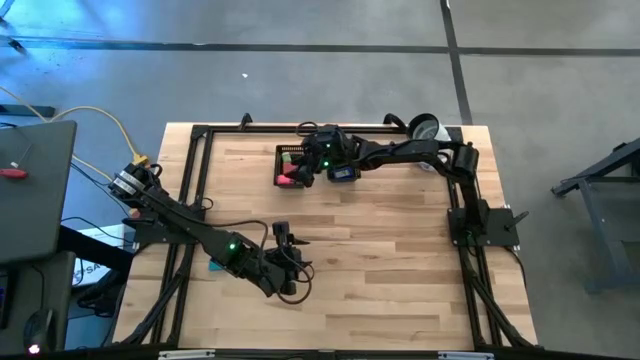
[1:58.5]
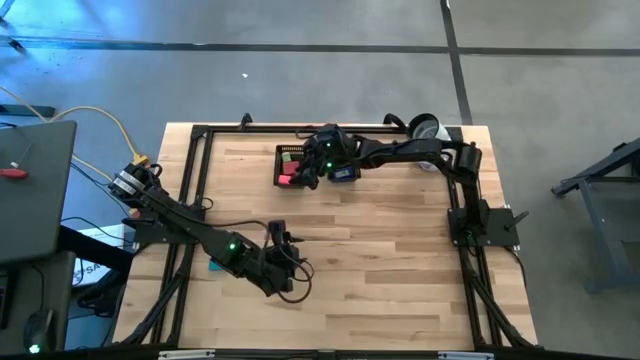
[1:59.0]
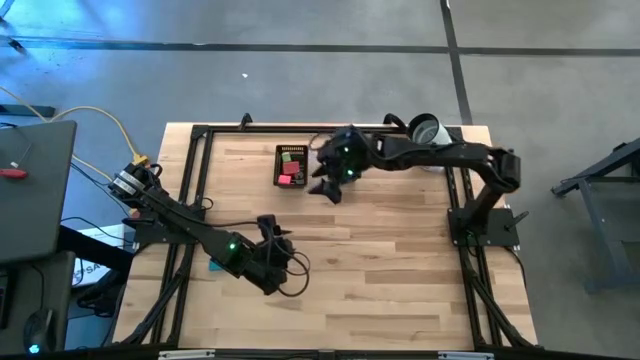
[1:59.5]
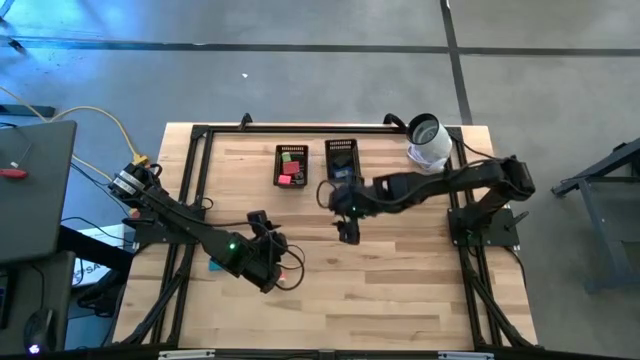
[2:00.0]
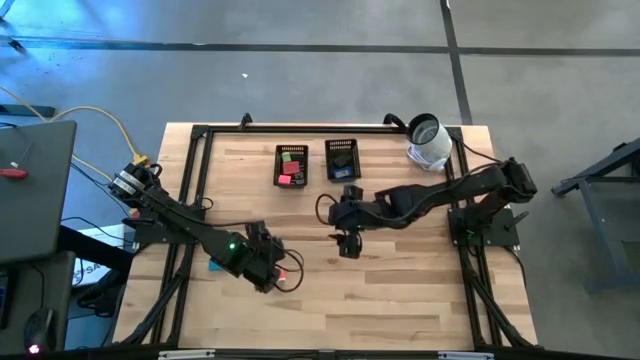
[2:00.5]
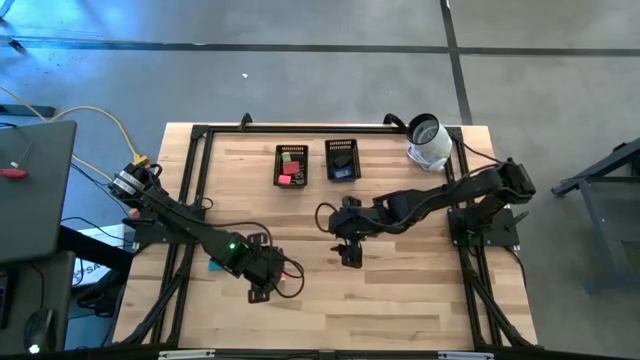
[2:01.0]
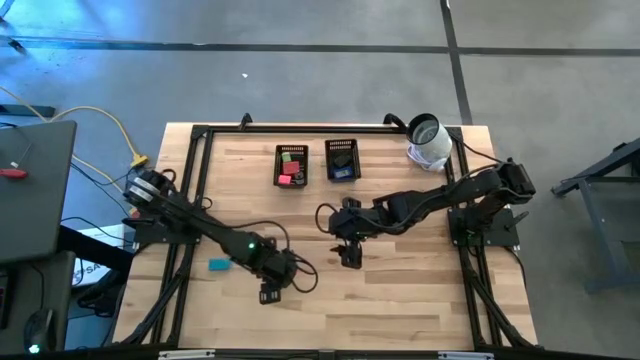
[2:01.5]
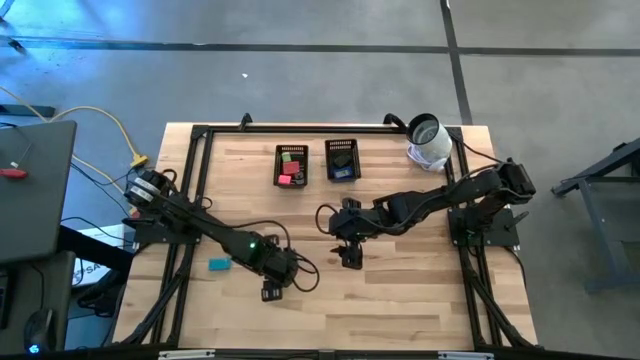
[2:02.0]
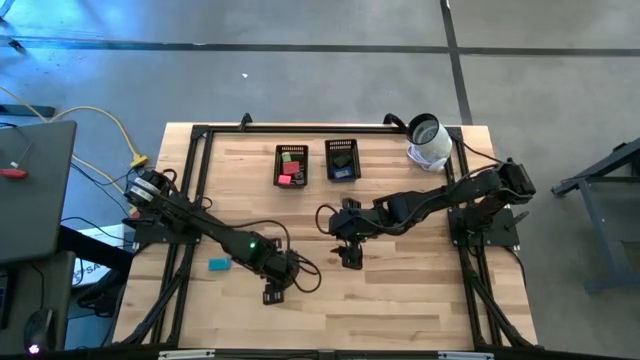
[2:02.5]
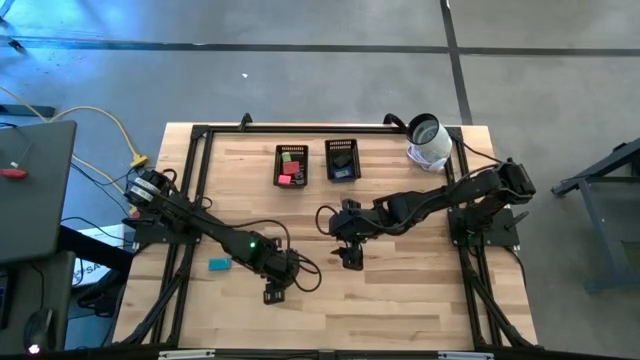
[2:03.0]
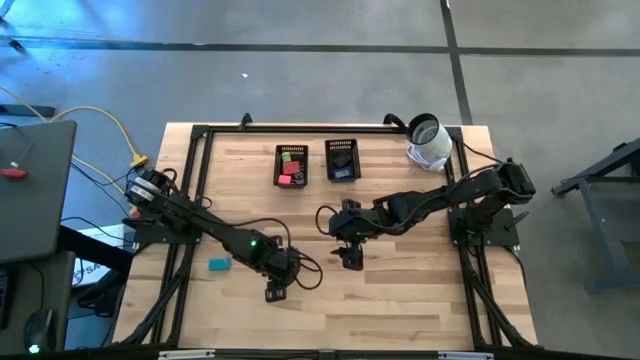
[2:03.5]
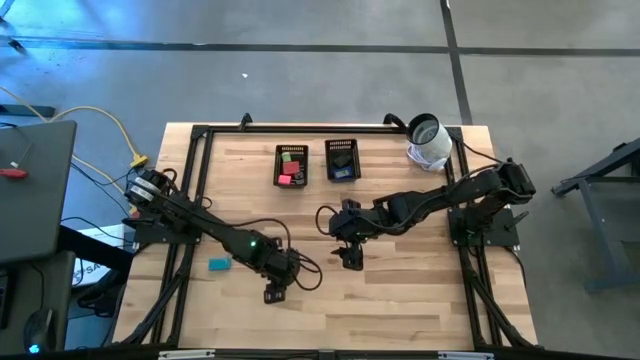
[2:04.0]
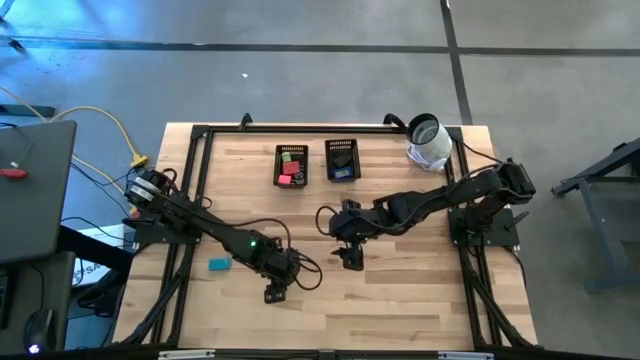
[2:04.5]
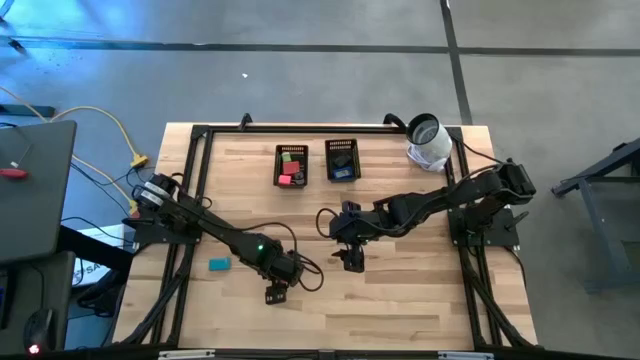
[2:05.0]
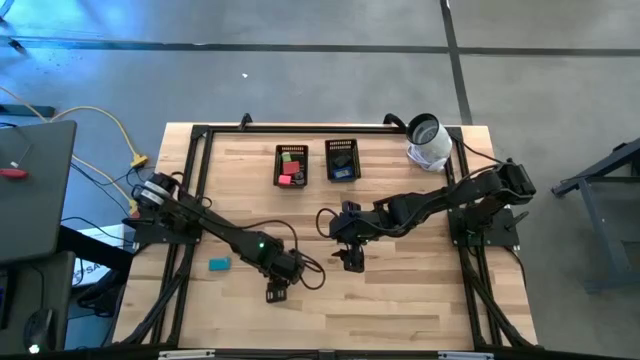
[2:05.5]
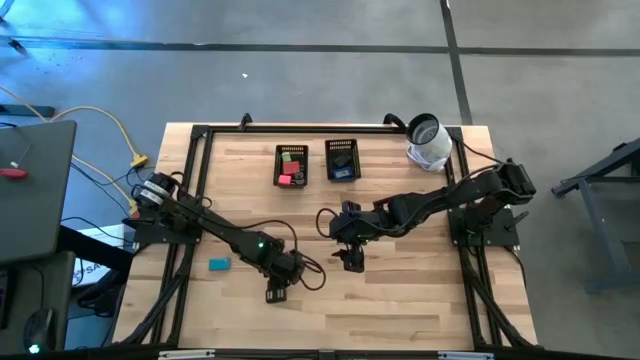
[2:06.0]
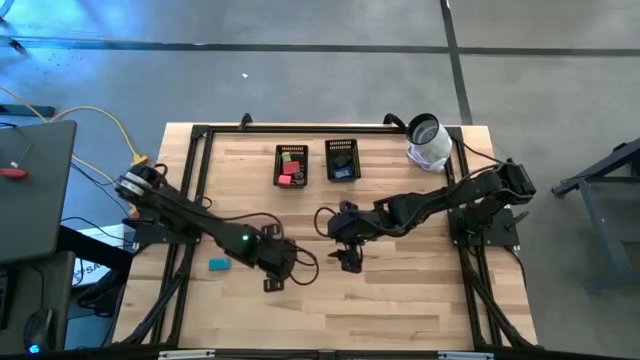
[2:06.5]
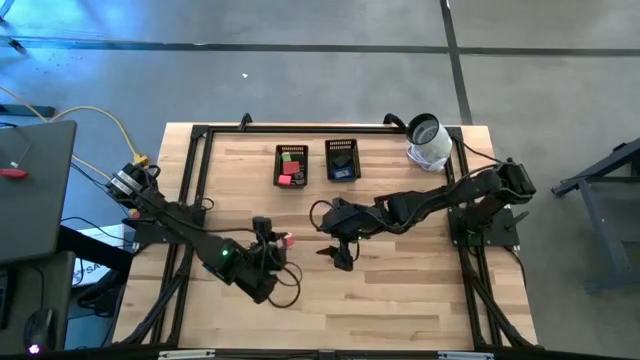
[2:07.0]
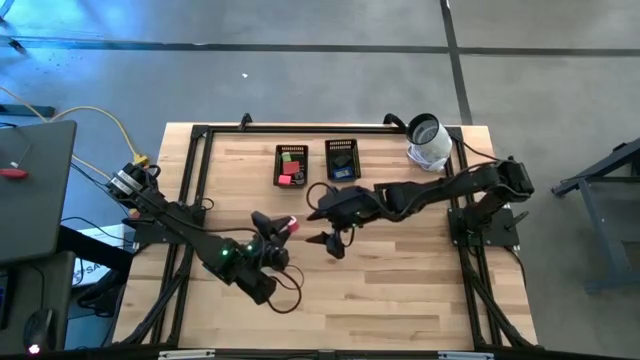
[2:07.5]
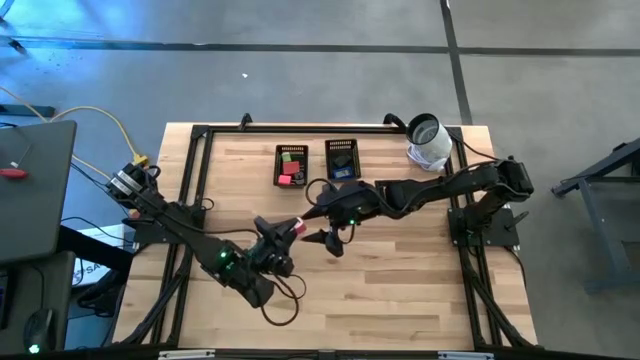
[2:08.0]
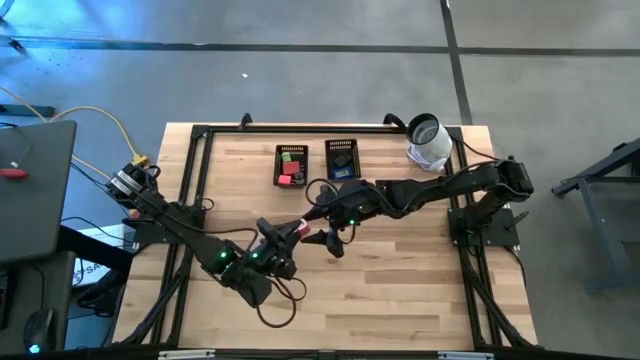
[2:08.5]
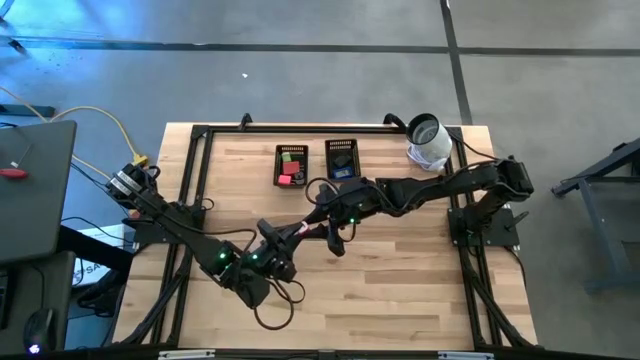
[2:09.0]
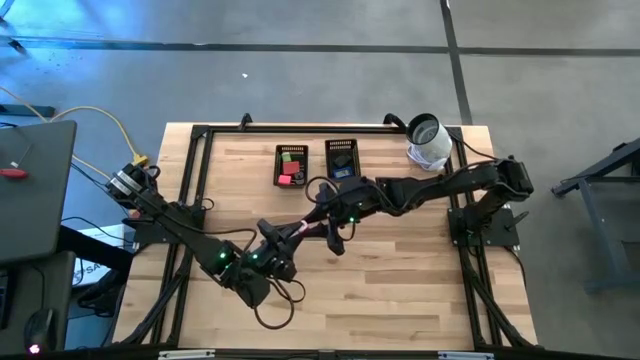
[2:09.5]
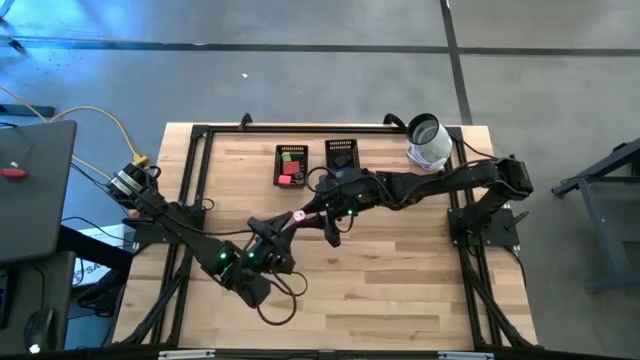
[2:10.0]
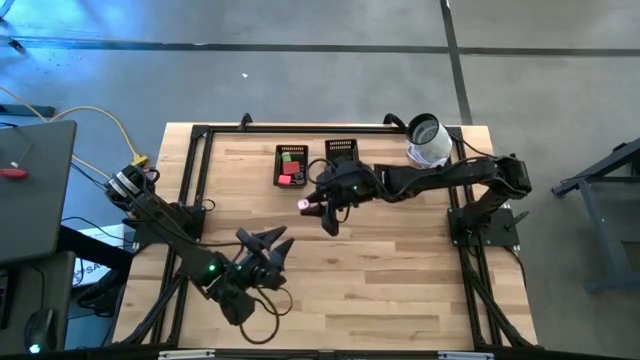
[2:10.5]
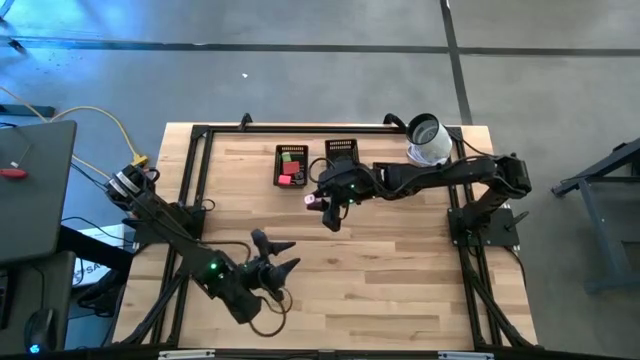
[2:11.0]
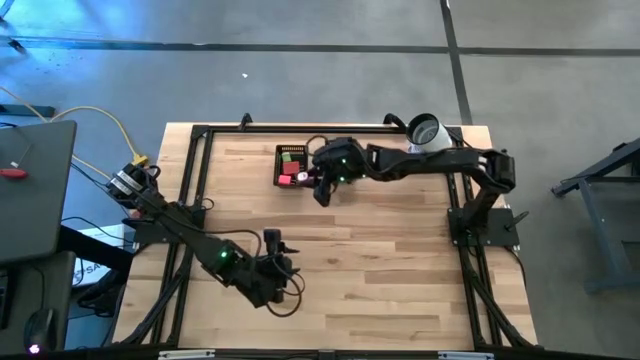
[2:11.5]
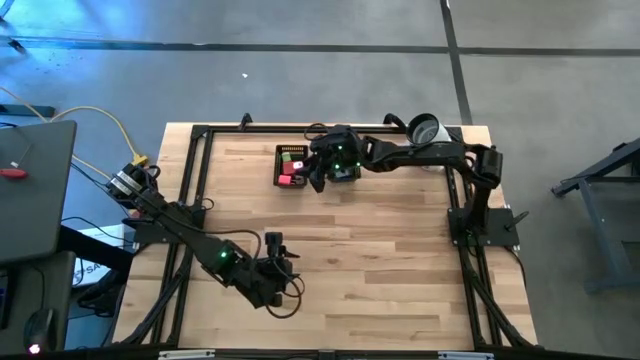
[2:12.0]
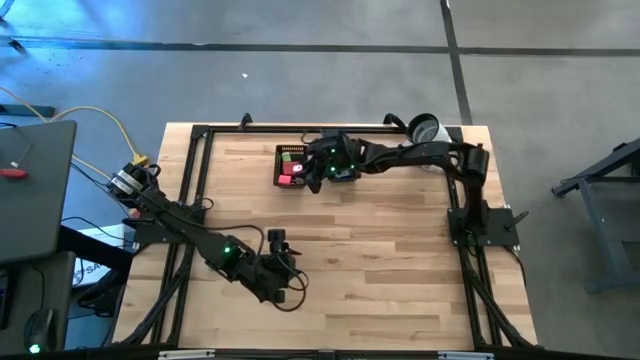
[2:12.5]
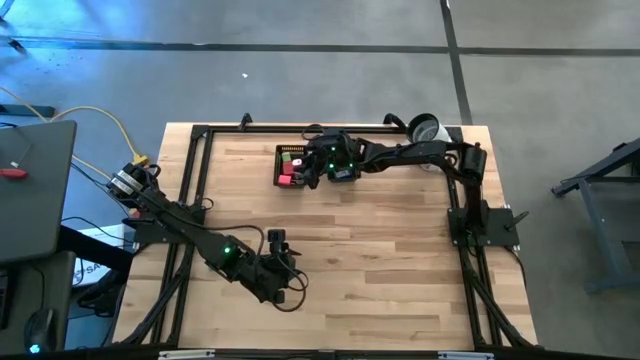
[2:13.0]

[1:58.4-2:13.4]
Task: Pick & Place Office items
Put the white and pink charger adapter into the left black bin

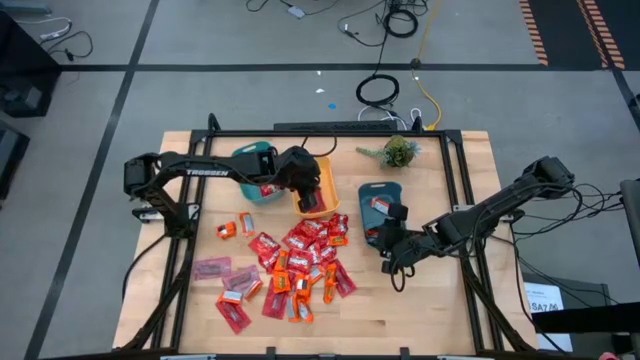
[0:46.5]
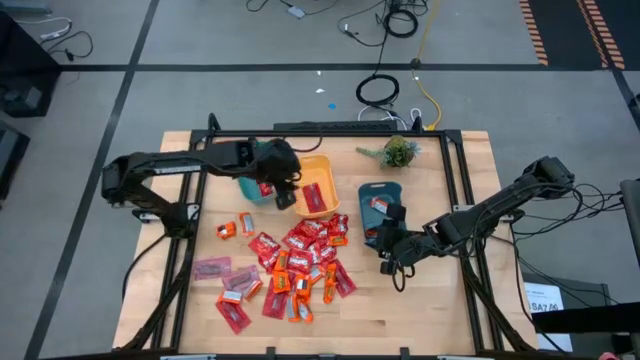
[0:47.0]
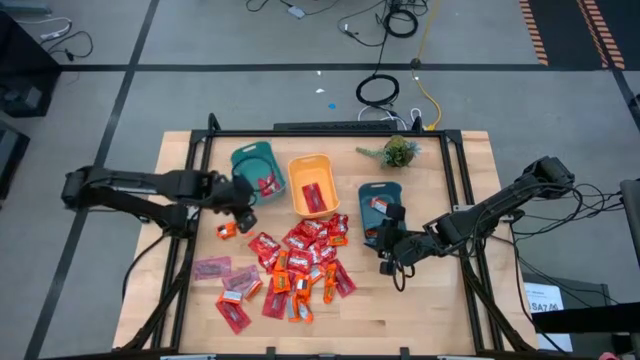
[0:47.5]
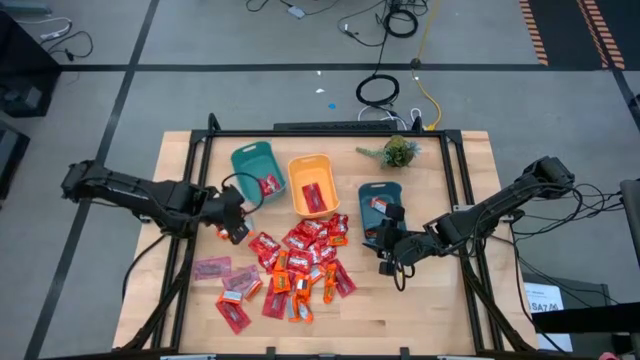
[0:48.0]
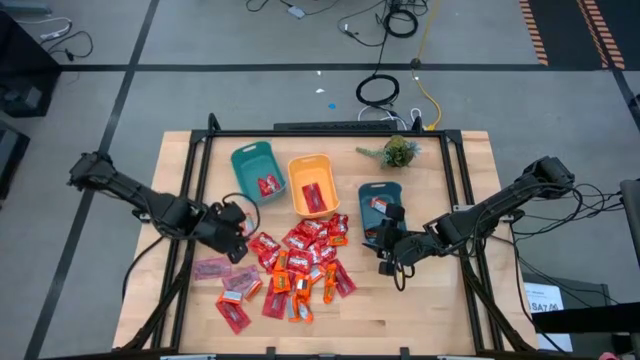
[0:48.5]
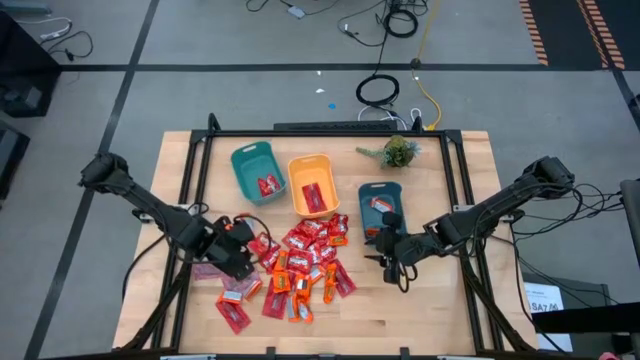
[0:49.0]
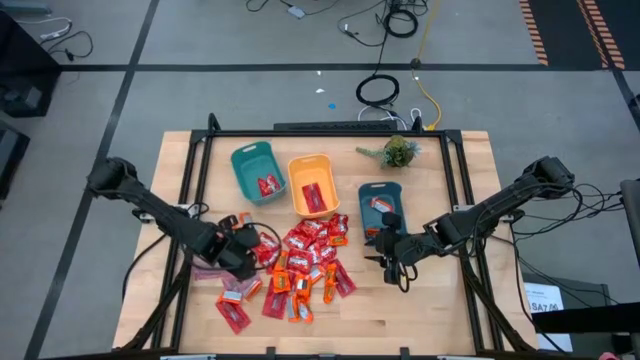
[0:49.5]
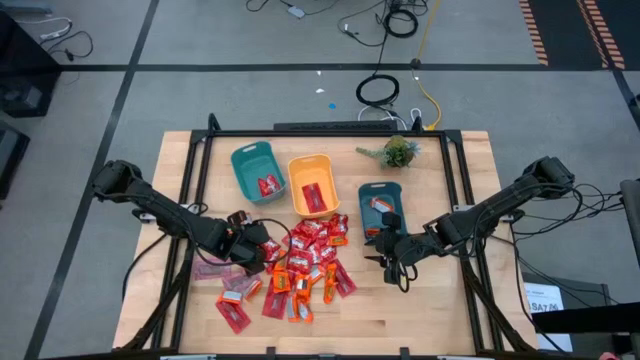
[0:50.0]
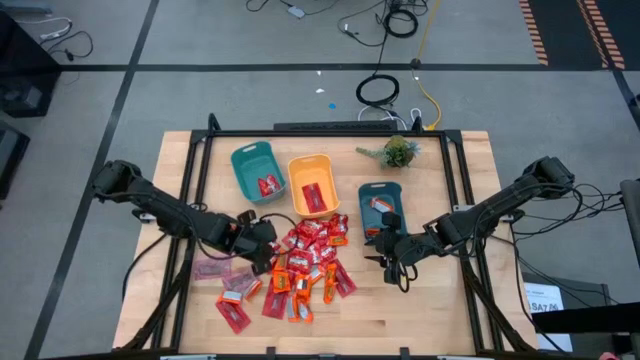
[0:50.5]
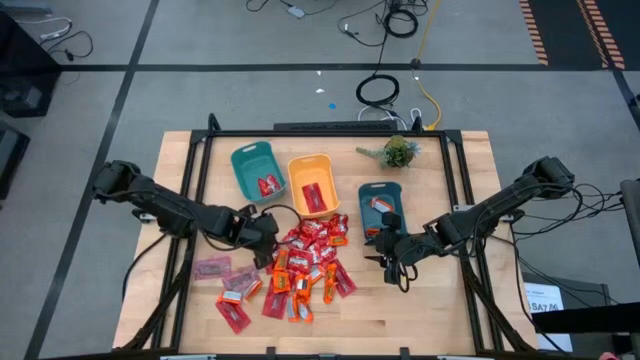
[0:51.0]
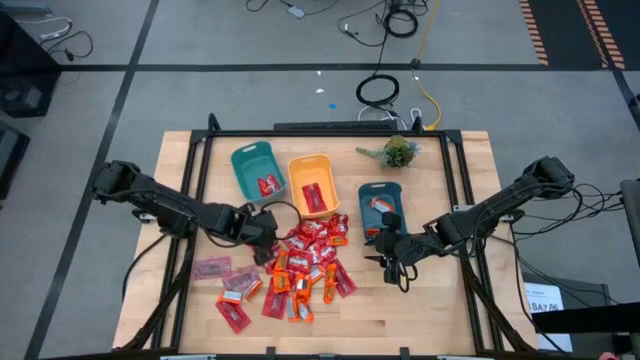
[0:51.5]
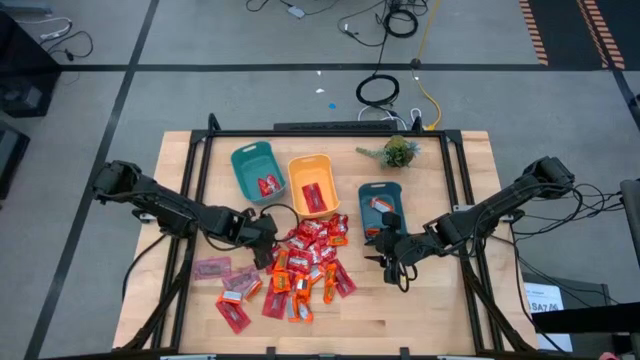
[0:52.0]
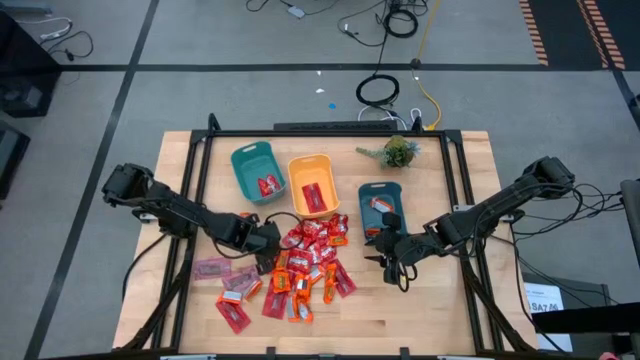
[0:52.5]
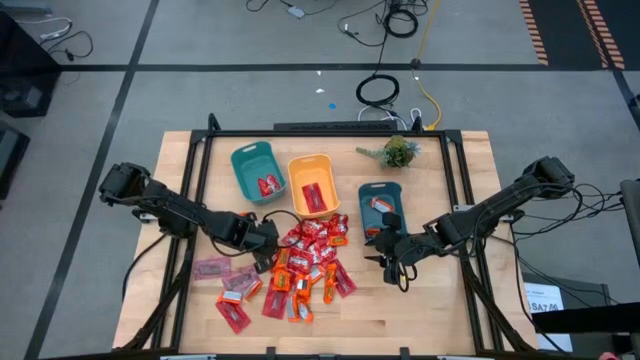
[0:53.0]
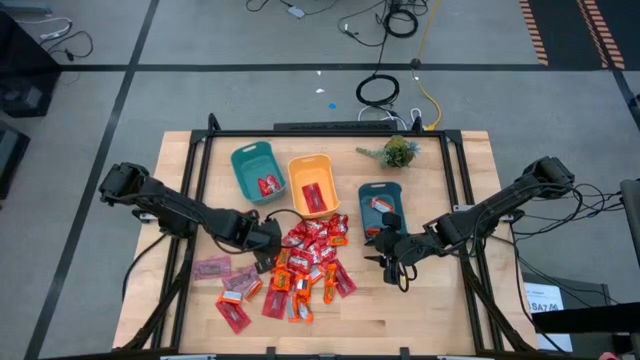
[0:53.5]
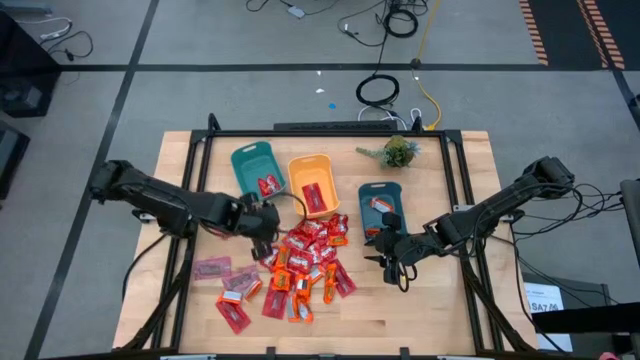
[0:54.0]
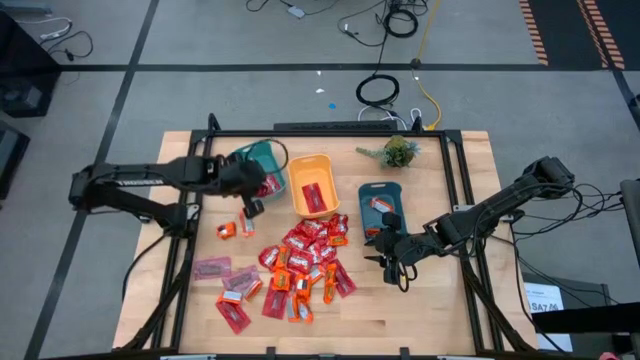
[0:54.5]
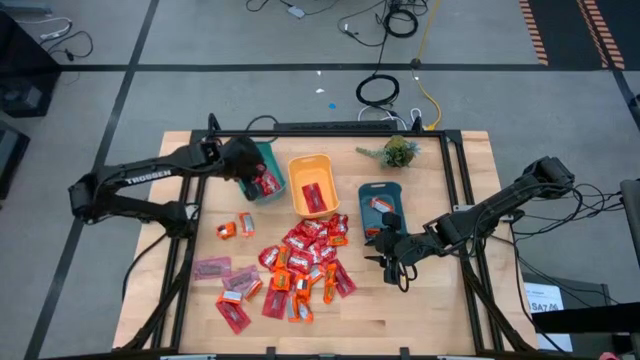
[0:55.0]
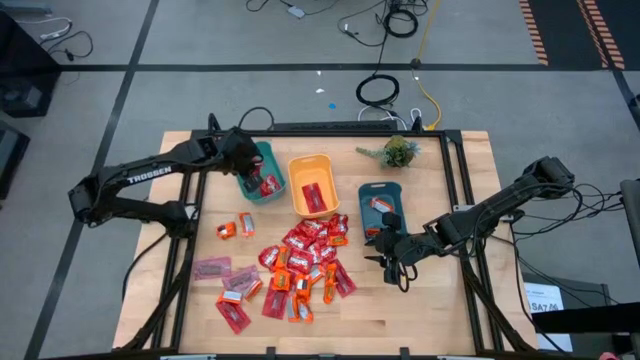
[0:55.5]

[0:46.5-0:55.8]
Task: Sort candy
Put the red pack of candy into the light blue bin
